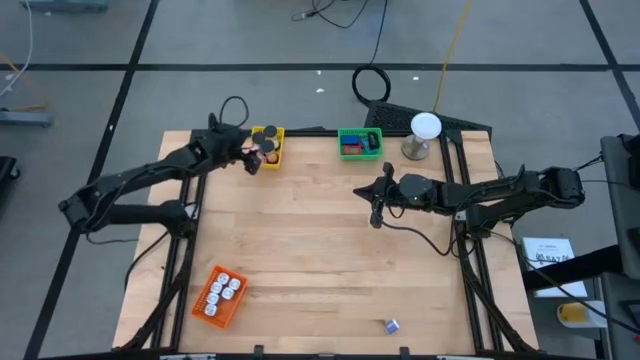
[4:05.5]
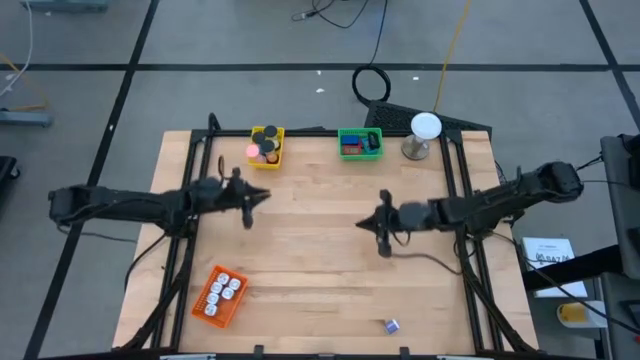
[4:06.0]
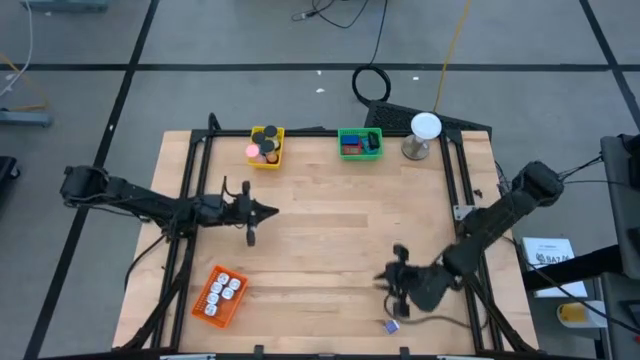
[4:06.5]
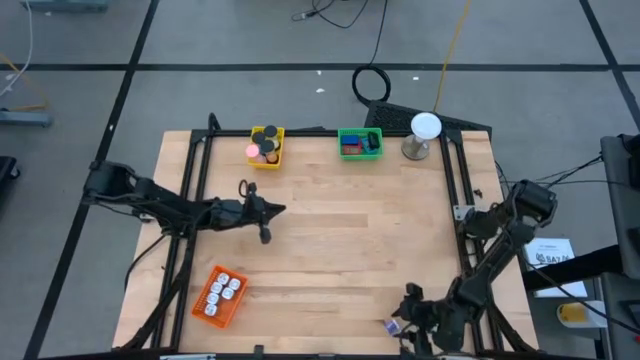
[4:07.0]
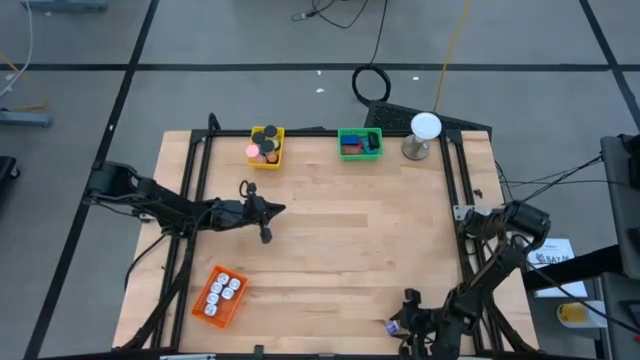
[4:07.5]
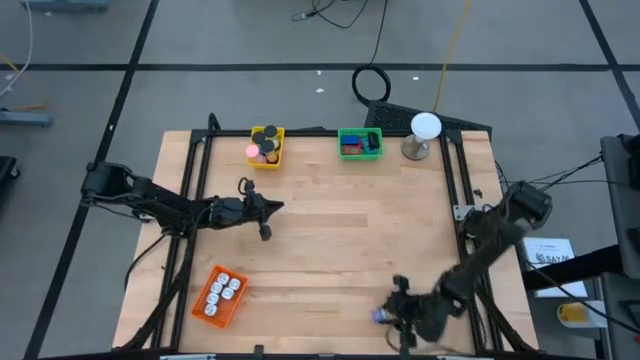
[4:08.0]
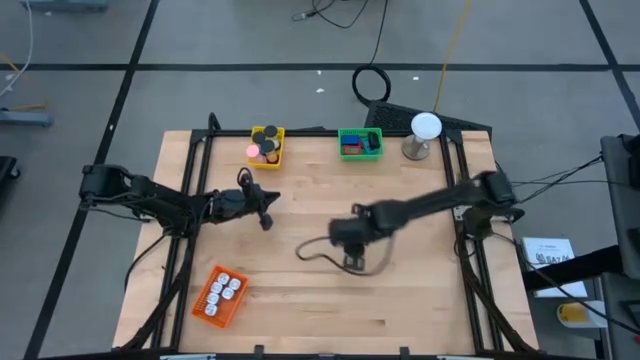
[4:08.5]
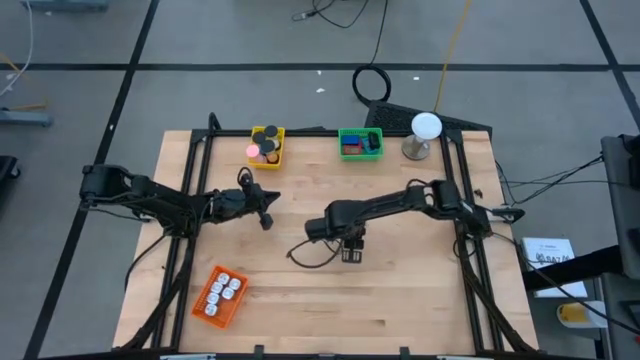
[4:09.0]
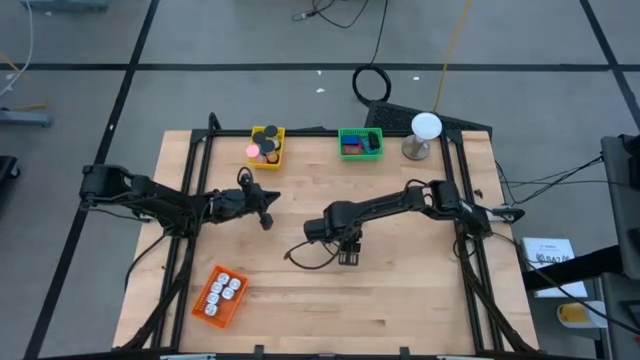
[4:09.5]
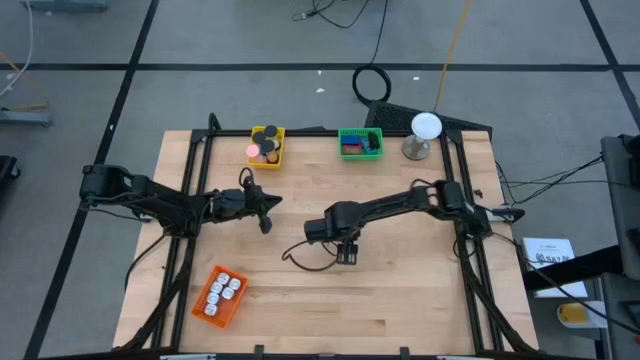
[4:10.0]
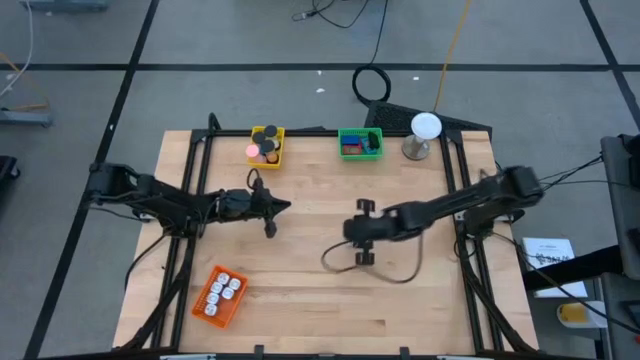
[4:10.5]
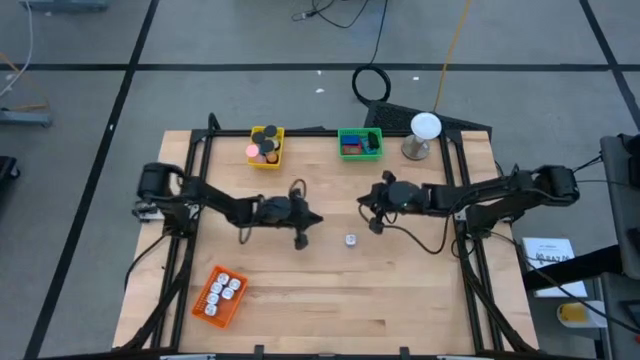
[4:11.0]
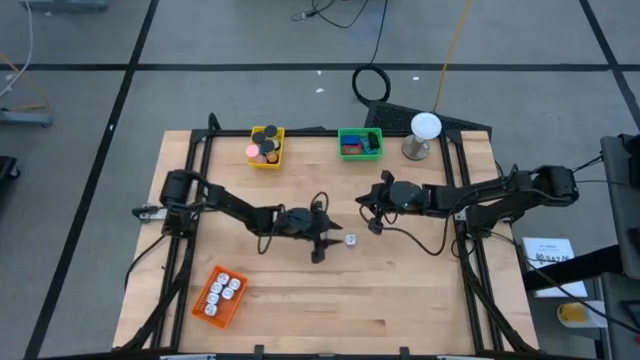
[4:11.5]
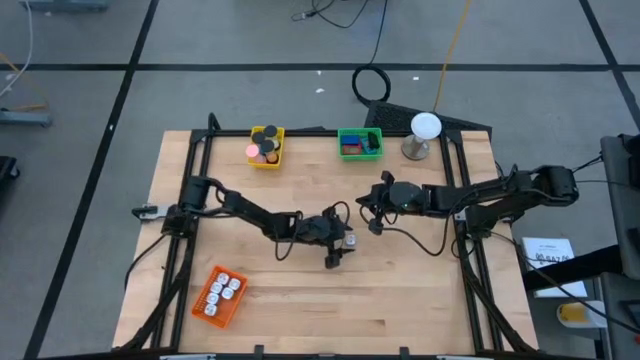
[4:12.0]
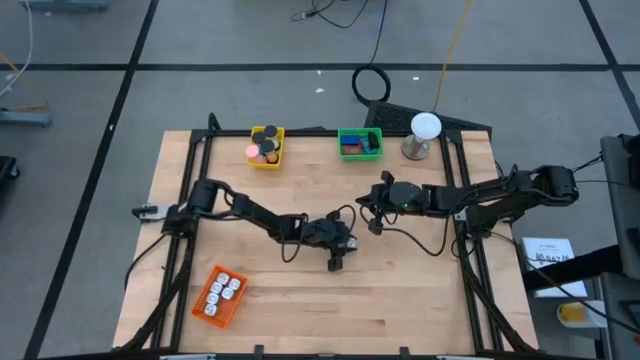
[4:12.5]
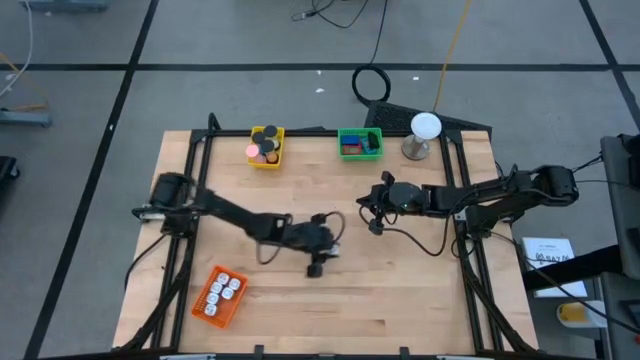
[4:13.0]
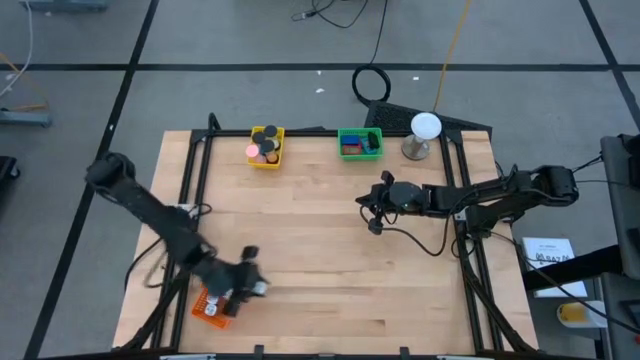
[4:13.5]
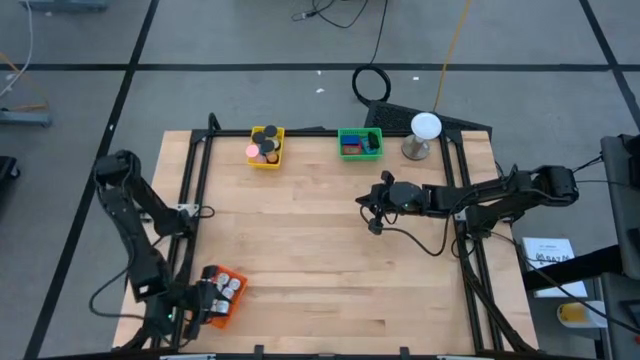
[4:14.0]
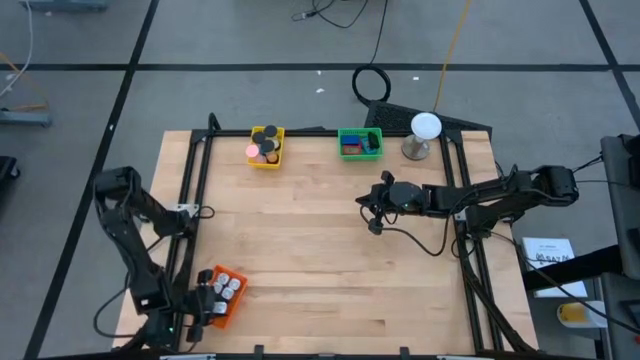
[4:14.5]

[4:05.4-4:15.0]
Task: Pick & Place Office items
Put the purple charger adapter into the orange bin

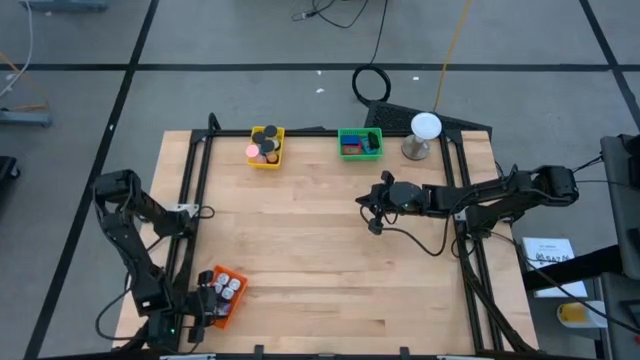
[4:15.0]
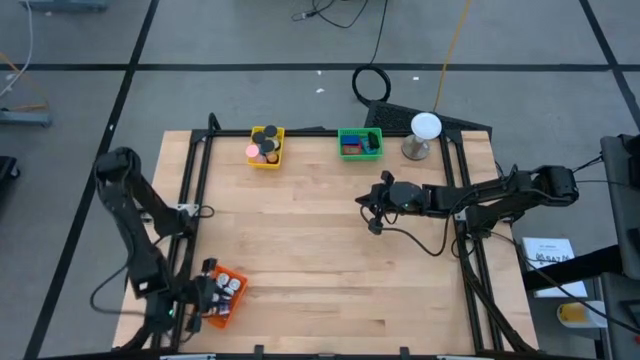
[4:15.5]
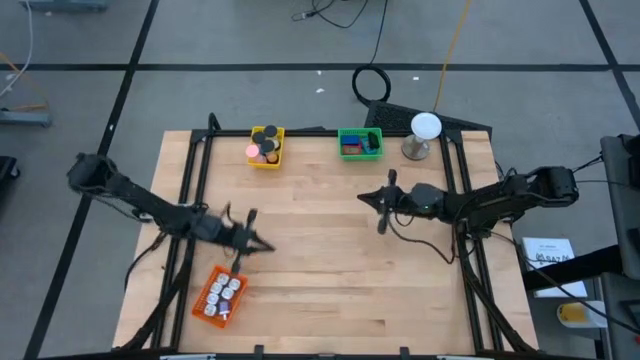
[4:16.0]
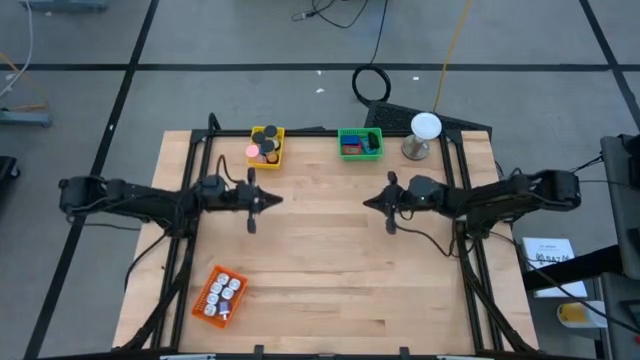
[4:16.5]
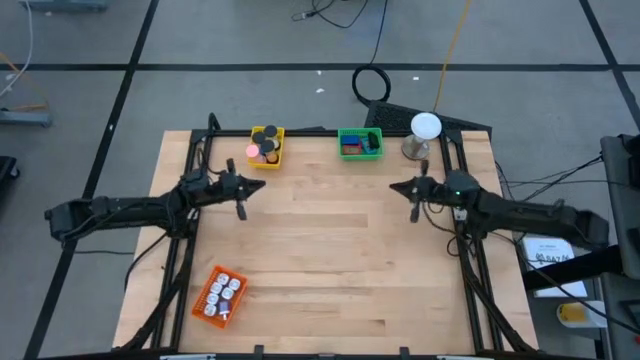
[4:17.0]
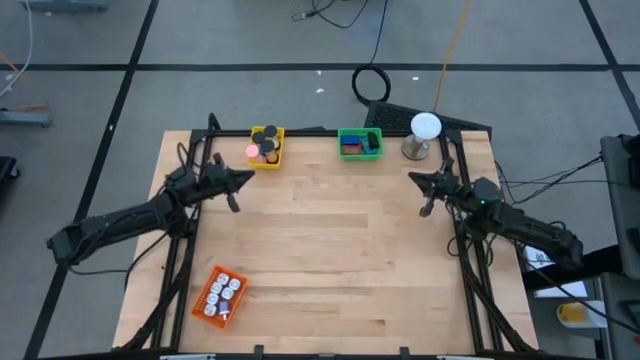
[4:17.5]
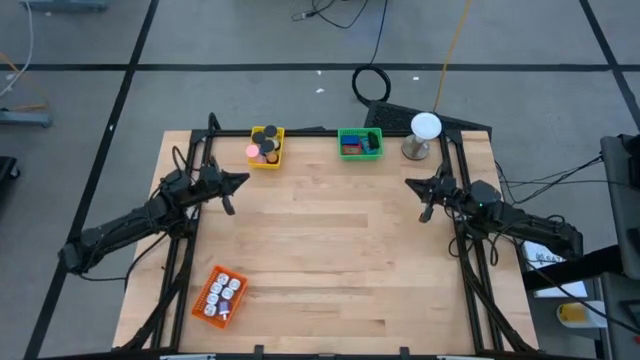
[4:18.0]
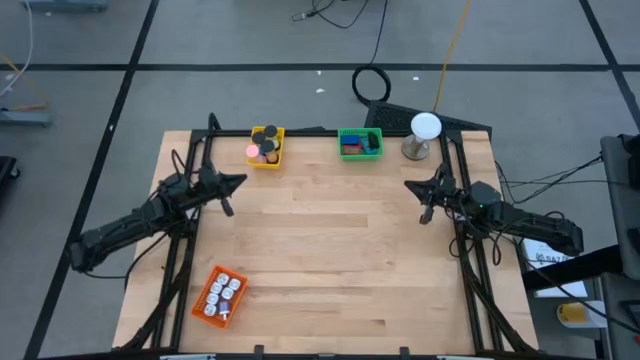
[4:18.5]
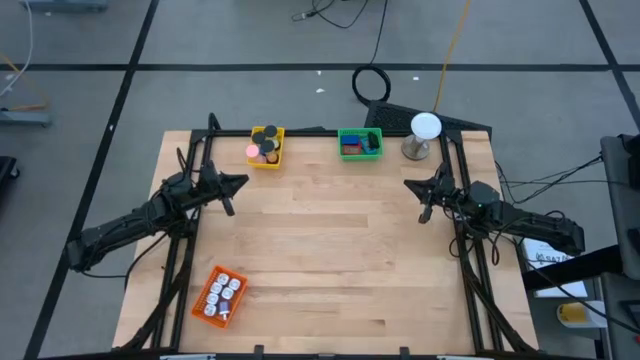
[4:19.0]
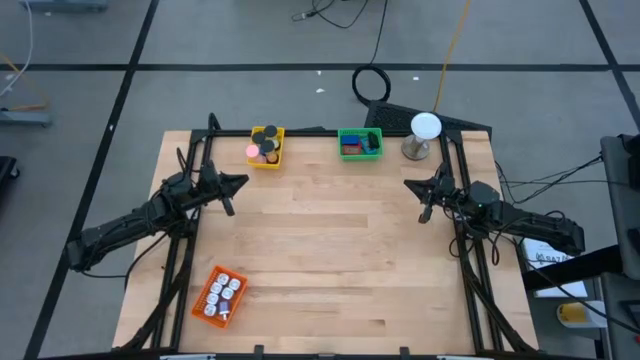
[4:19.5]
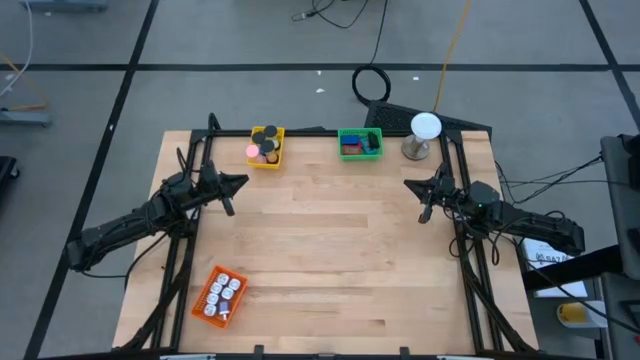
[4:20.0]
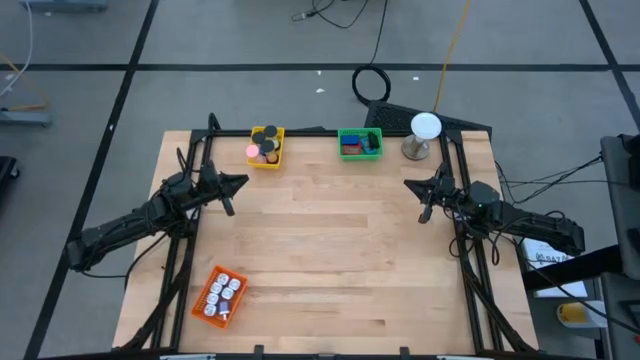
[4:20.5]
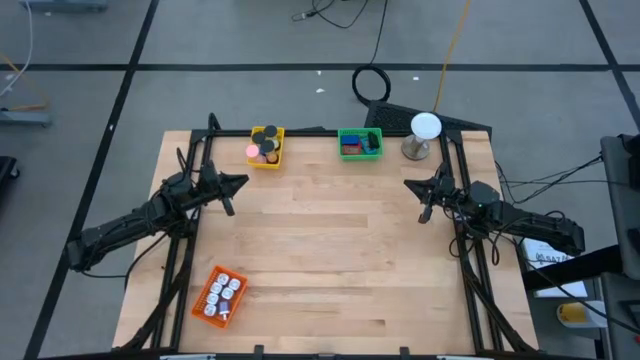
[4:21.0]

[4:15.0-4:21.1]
Return to Home Position
